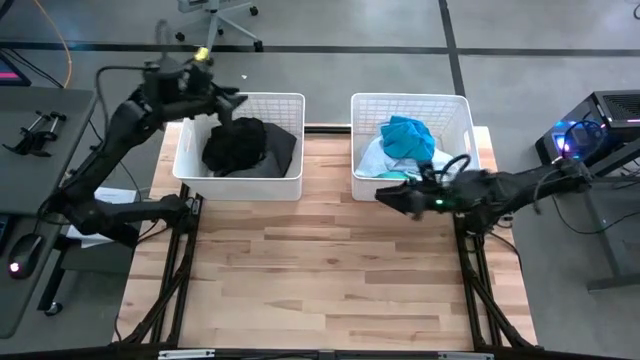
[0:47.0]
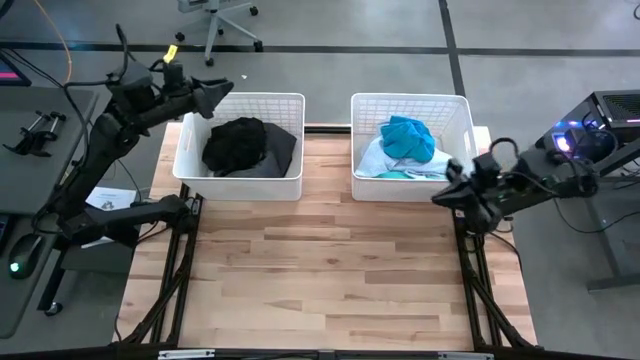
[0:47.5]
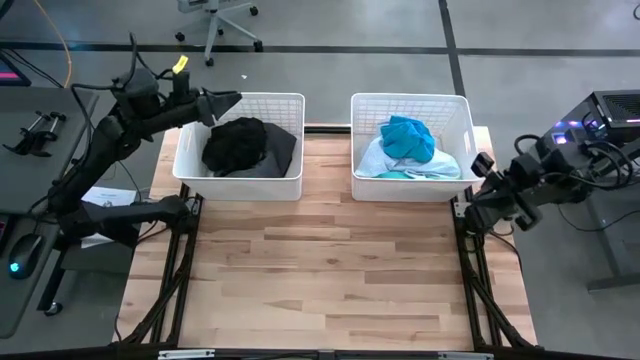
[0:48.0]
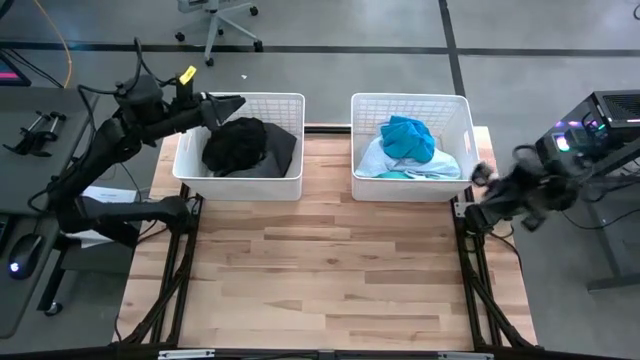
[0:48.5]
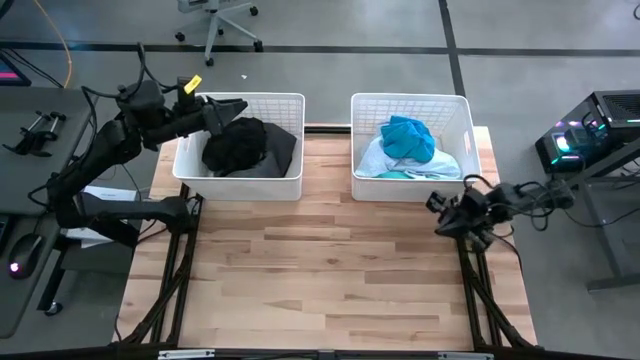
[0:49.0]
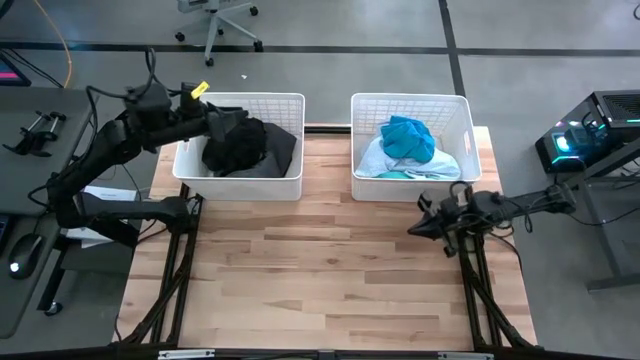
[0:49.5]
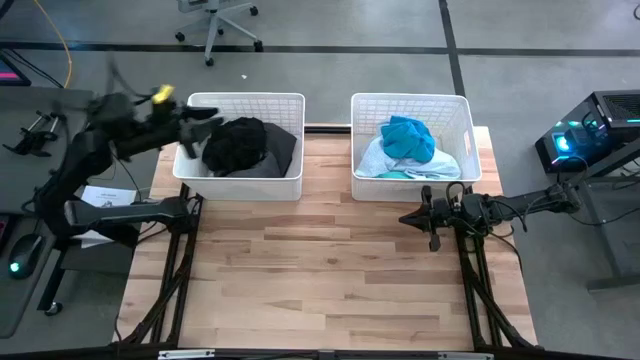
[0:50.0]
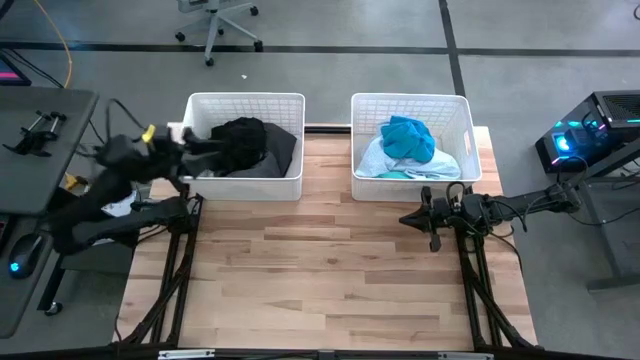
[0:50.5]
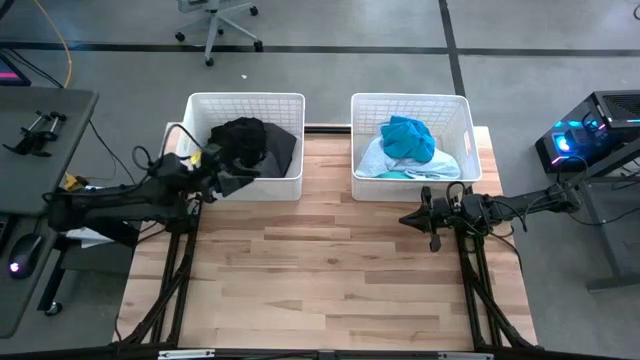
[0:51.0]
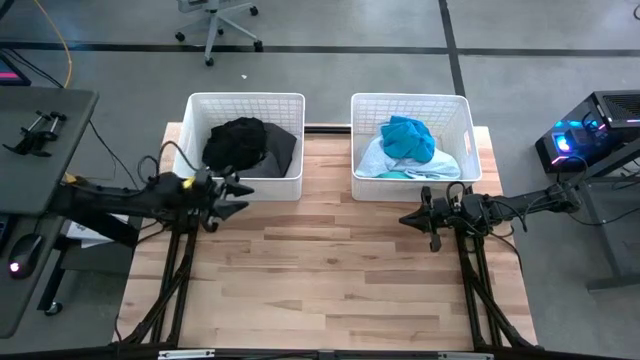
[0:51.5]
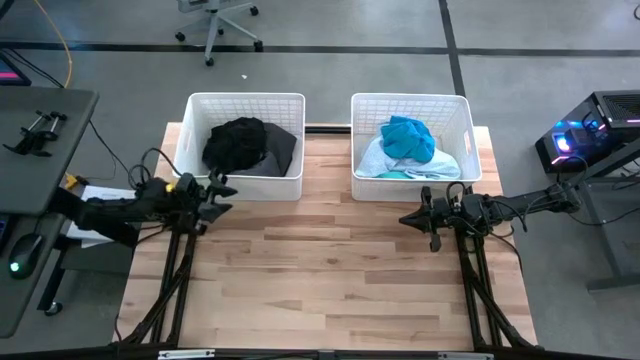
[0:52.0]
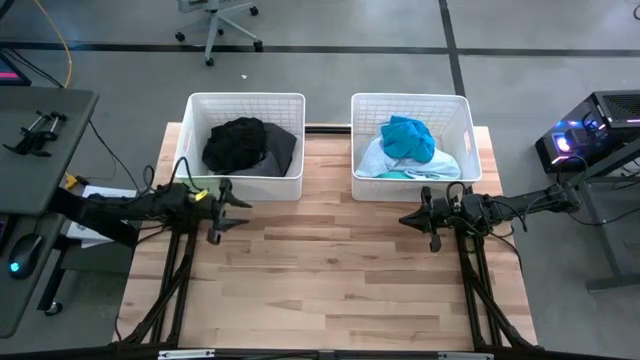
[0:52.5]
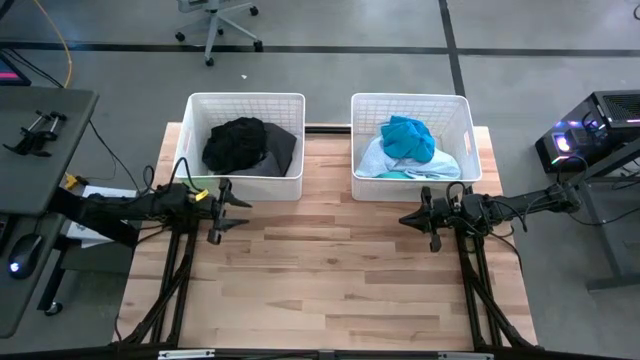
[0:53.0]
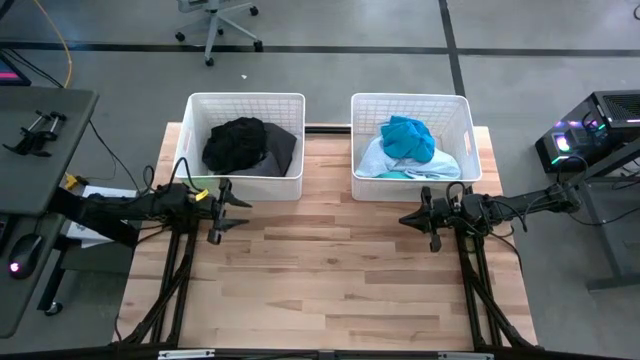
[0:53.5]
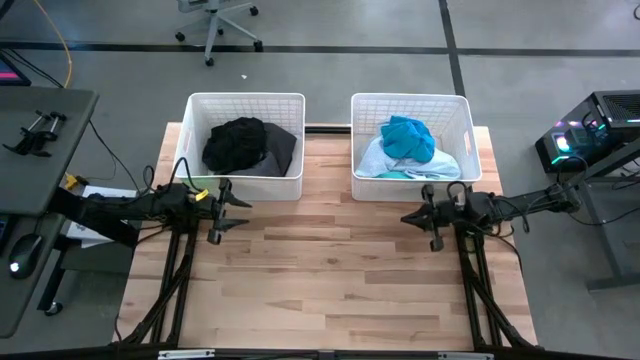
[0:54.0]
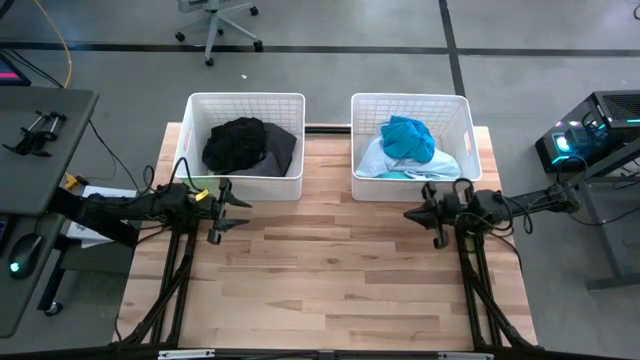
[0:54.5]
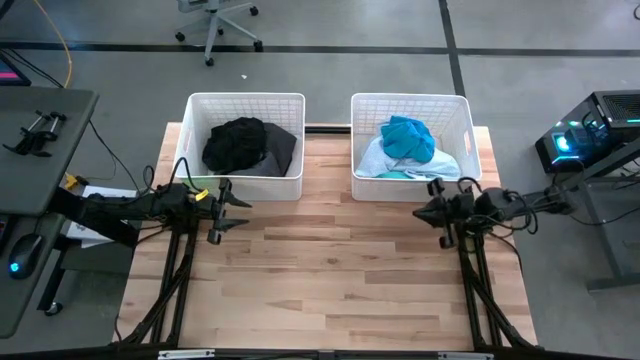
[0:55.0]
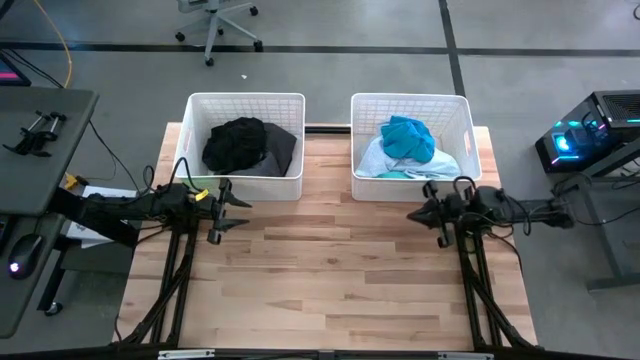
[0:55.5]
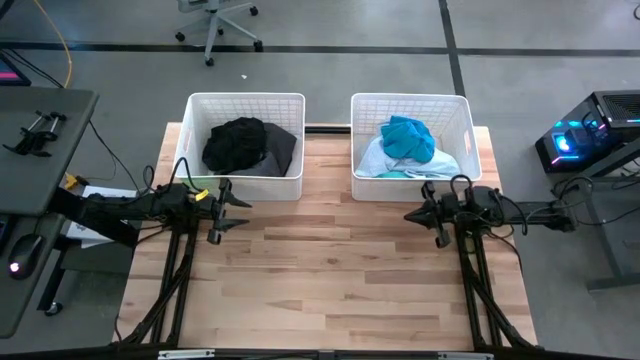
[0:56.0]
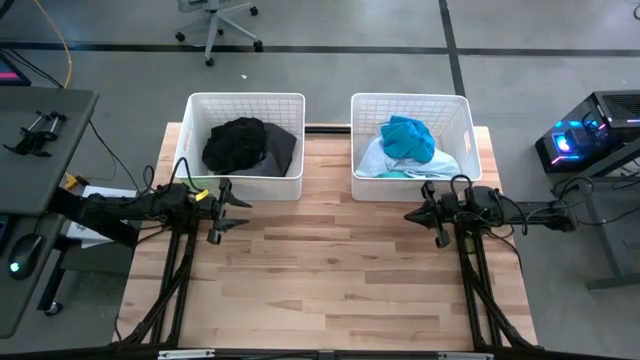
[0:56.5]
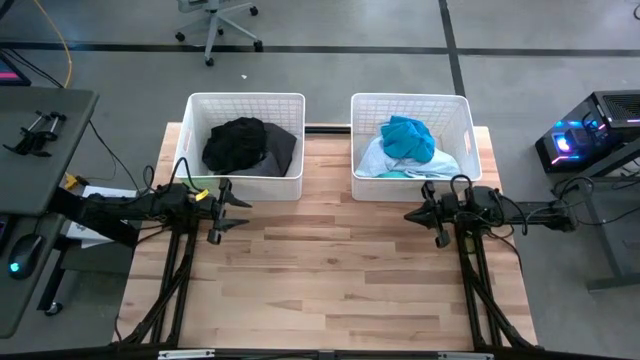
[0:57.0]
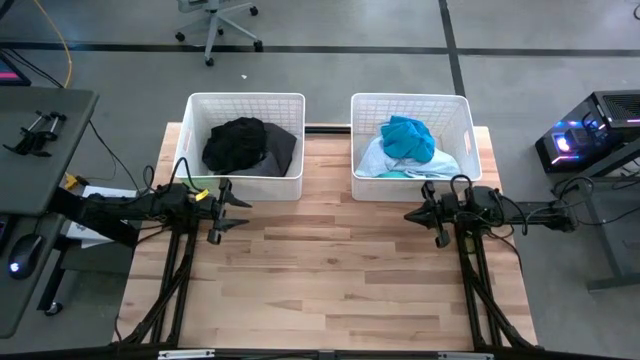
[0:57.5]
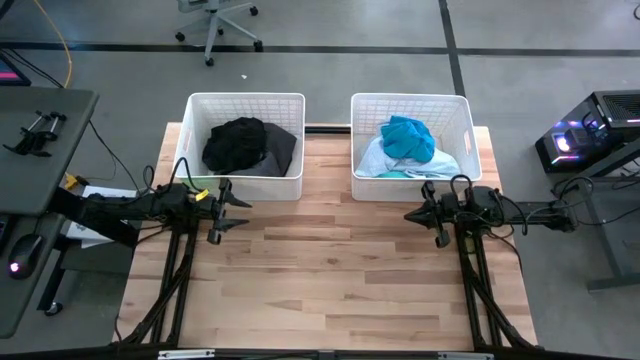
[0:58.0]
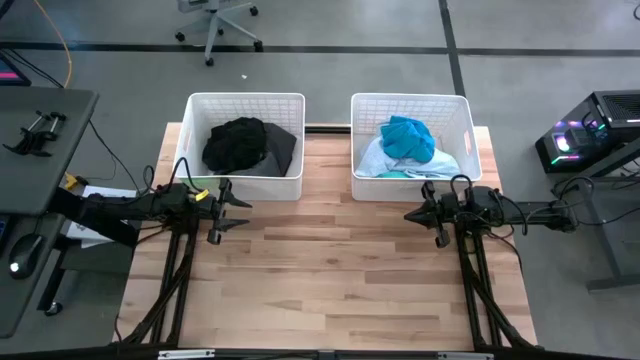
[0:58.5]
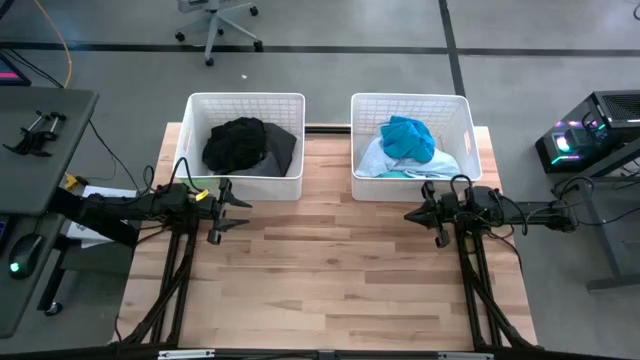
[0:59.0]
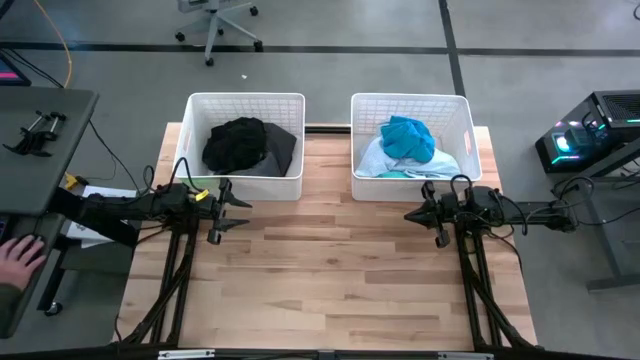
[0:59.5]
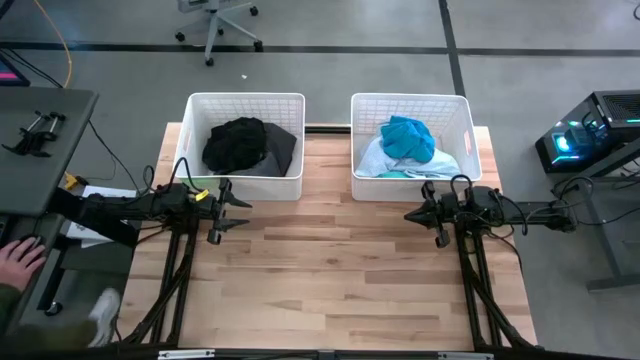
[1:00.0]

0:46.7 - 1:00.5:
Task: Sort clothes
Return to Home Position

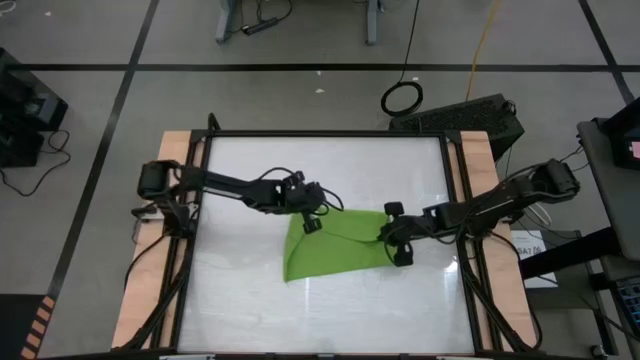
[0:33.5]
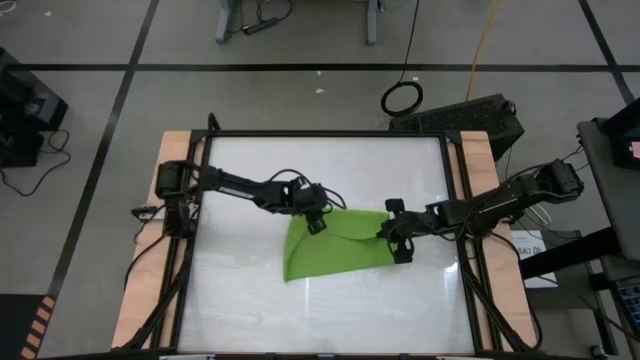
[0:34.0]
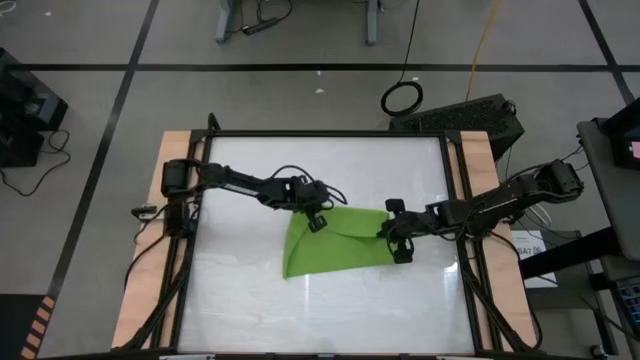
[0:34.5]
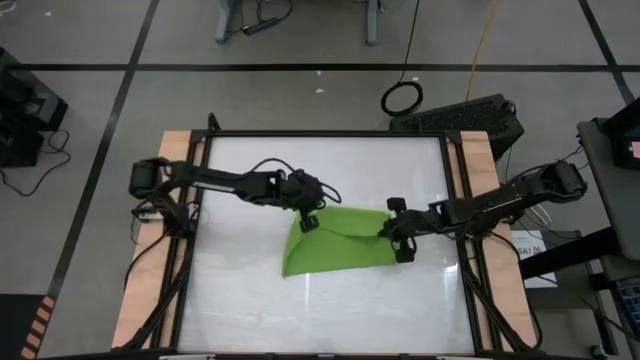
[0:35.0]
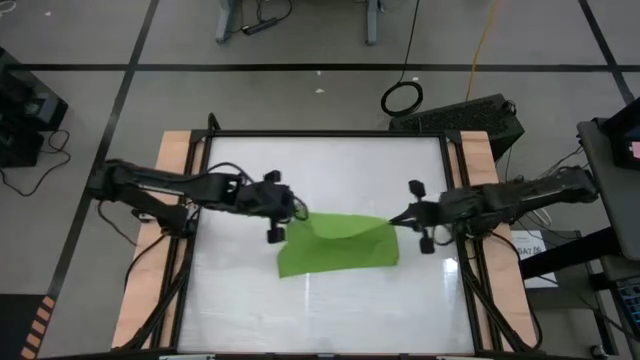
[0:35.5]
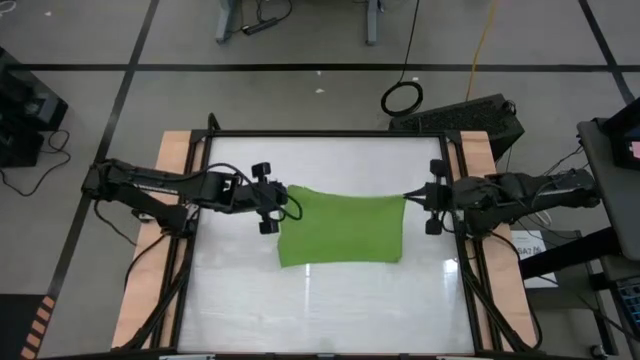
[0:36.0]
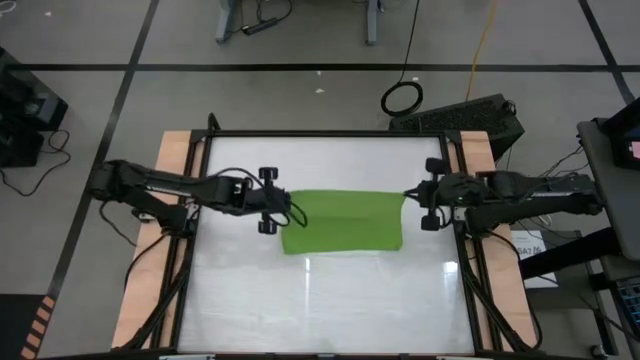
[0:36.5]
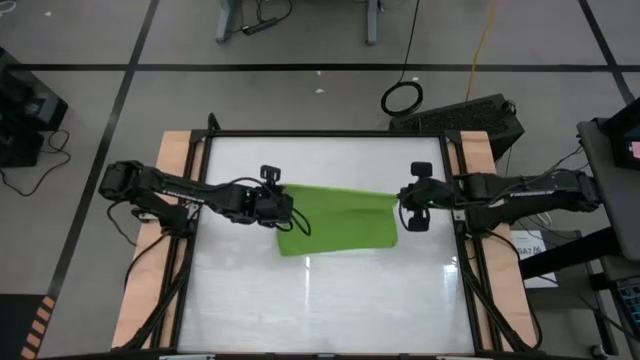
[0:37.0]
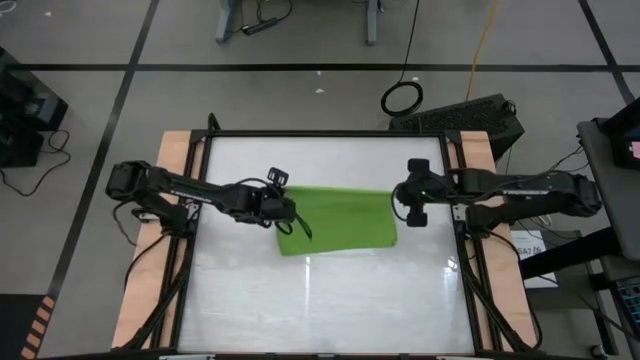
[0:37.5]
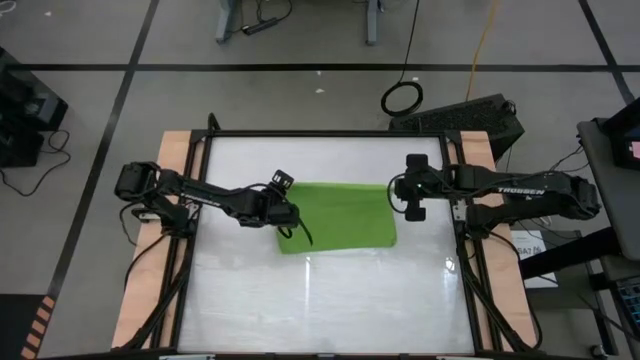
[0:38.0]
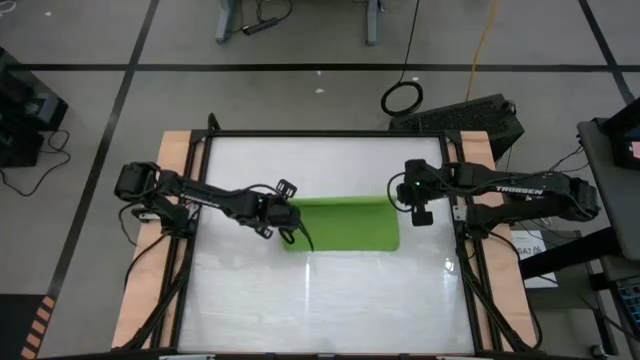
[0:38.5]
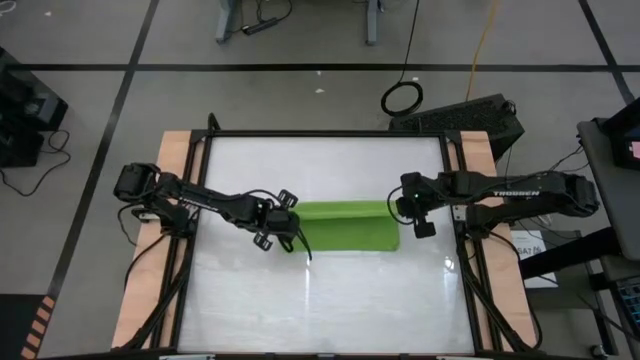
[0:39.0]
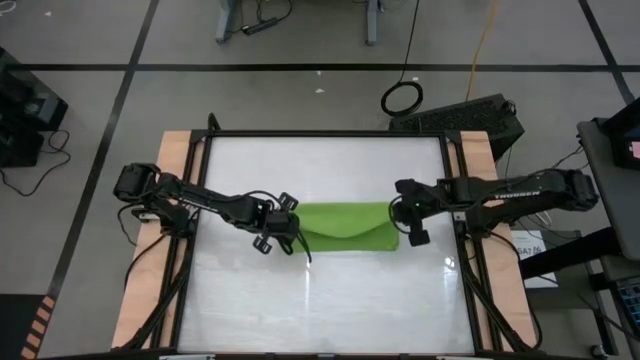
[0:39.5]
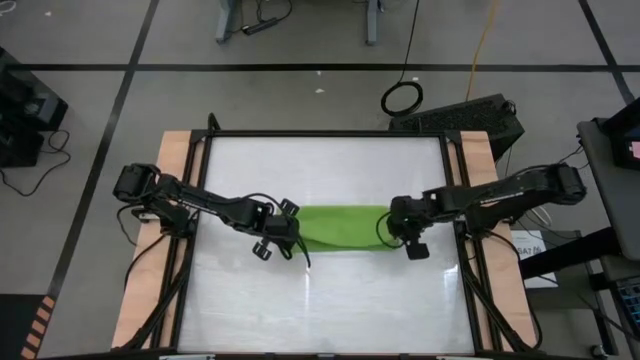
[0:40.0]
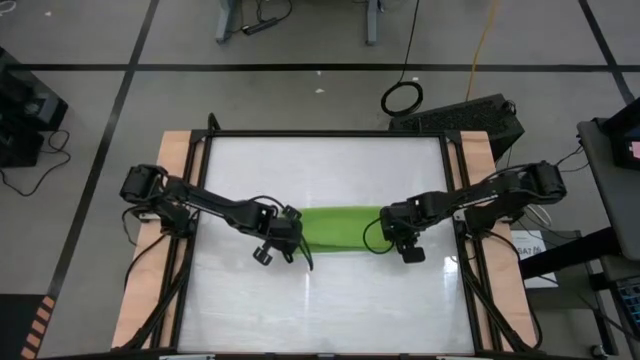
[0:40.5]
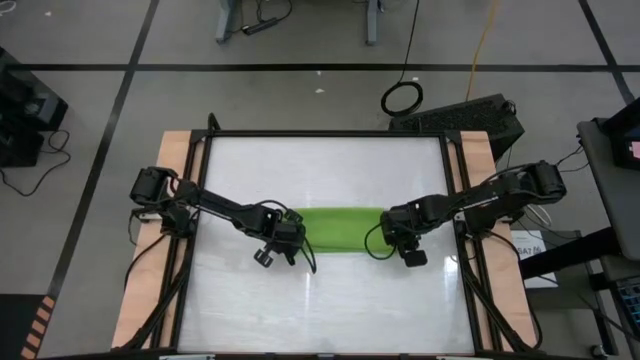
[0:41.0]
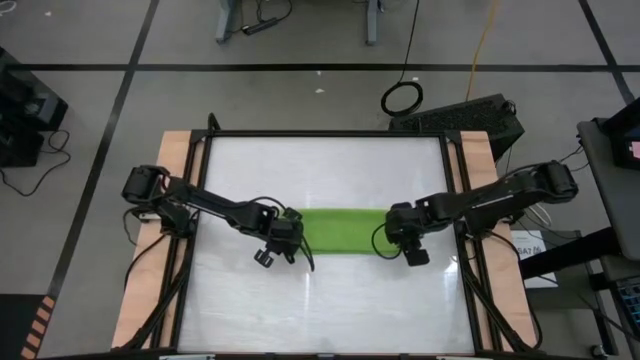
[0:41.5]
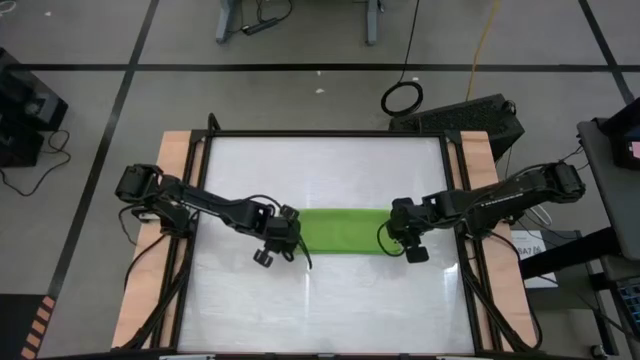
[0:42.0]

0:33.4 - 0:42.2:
Task: Roll towel
Fold the green towel
